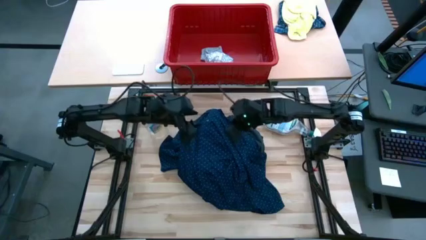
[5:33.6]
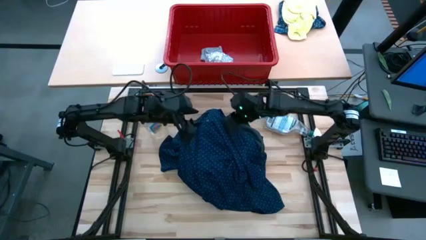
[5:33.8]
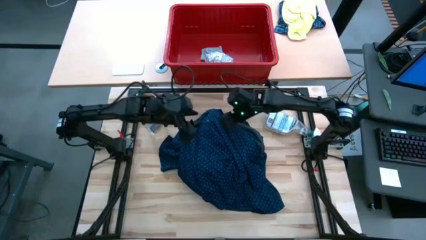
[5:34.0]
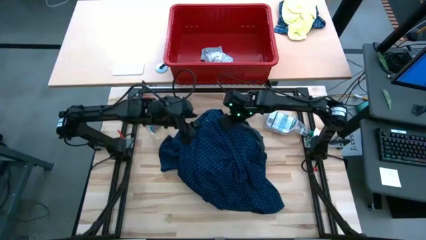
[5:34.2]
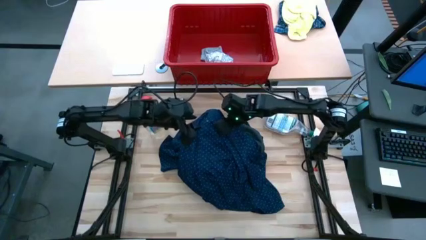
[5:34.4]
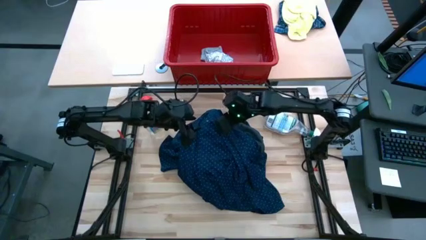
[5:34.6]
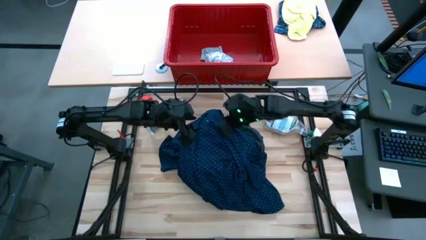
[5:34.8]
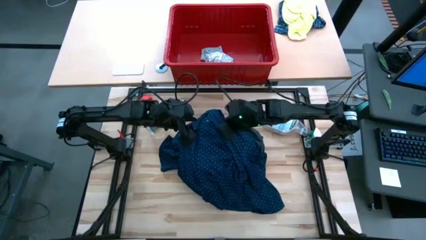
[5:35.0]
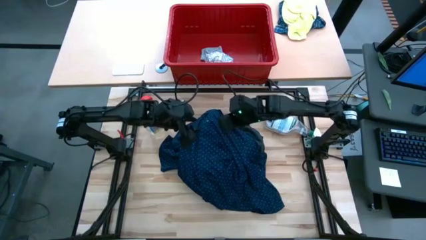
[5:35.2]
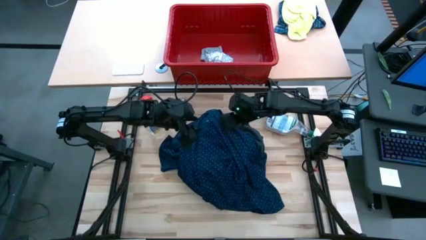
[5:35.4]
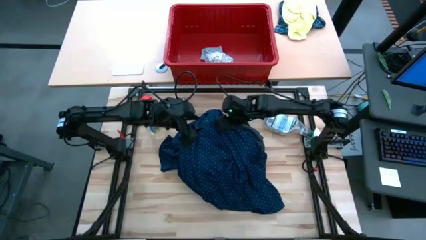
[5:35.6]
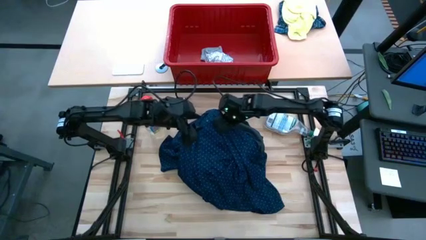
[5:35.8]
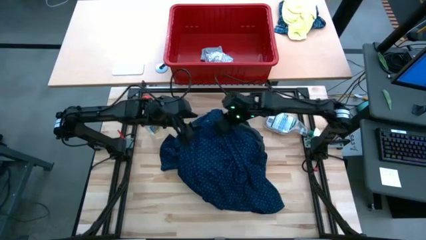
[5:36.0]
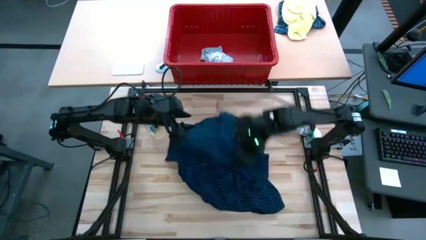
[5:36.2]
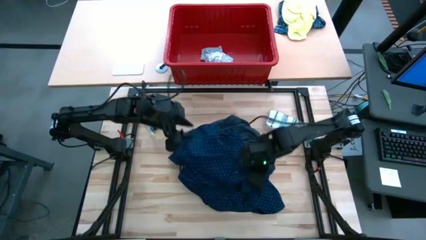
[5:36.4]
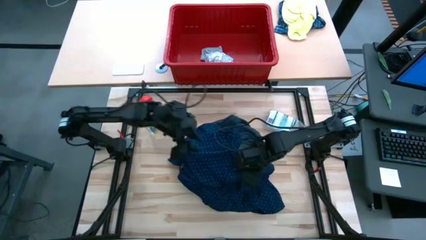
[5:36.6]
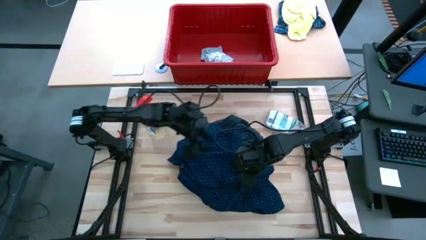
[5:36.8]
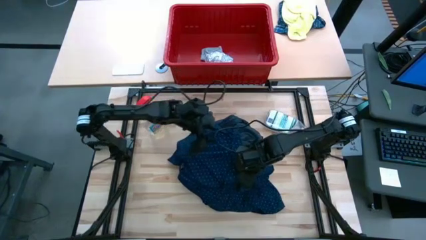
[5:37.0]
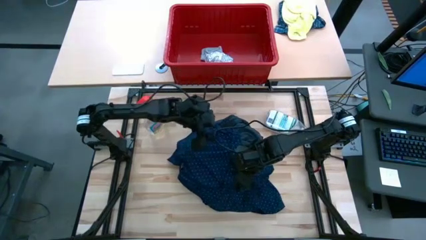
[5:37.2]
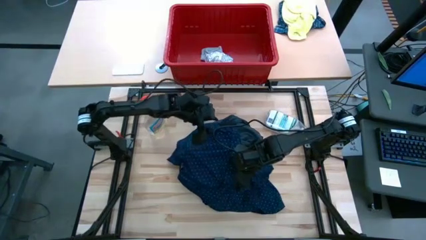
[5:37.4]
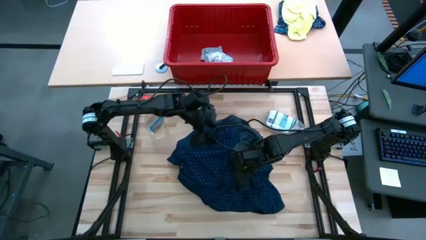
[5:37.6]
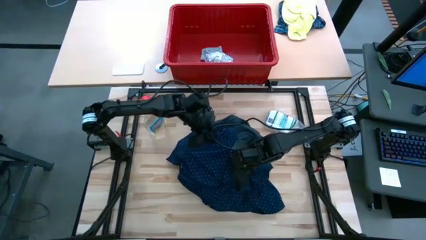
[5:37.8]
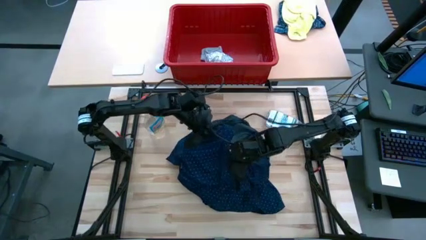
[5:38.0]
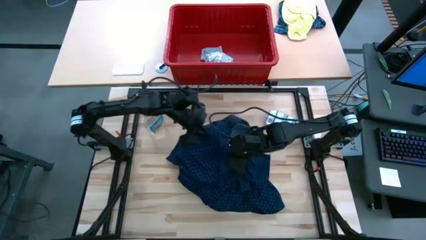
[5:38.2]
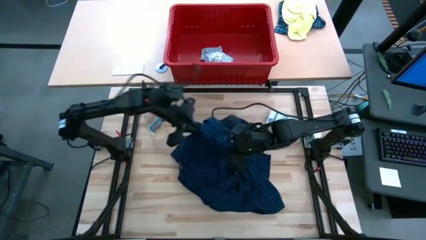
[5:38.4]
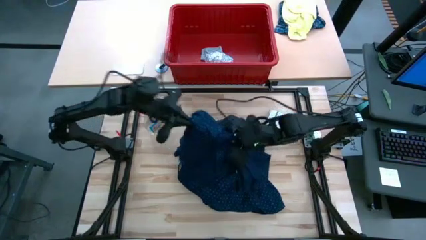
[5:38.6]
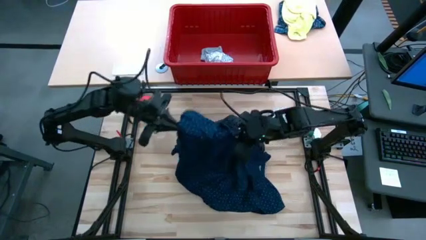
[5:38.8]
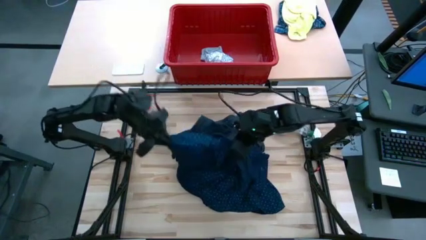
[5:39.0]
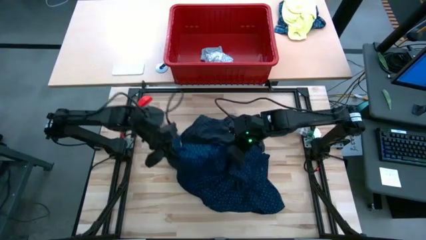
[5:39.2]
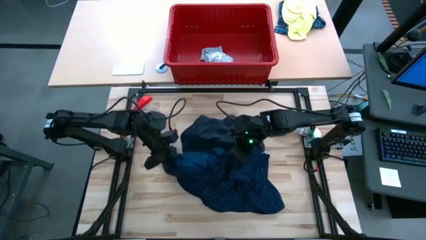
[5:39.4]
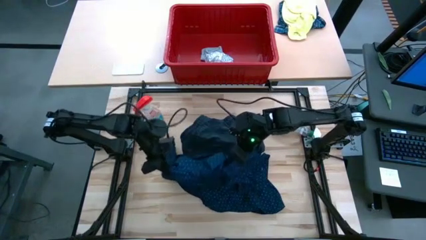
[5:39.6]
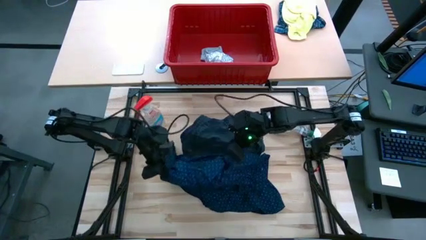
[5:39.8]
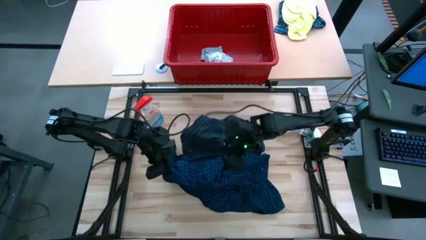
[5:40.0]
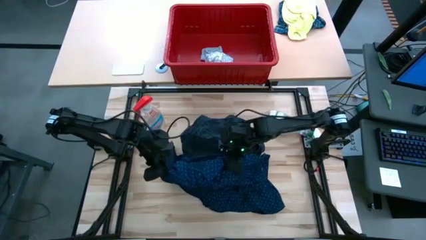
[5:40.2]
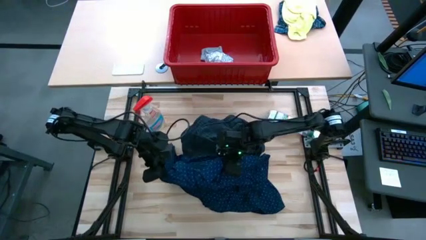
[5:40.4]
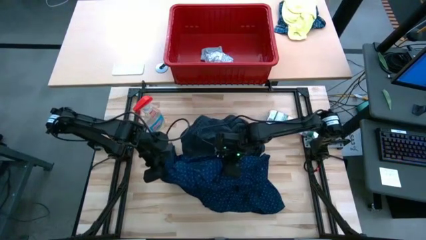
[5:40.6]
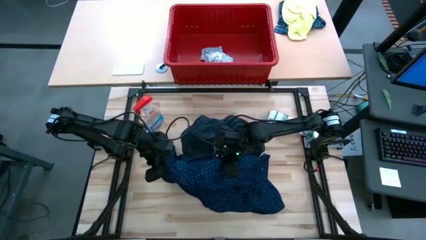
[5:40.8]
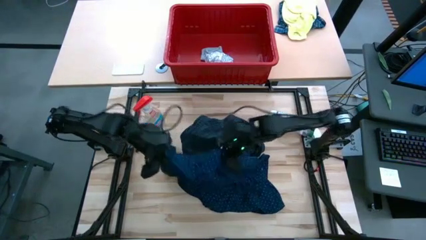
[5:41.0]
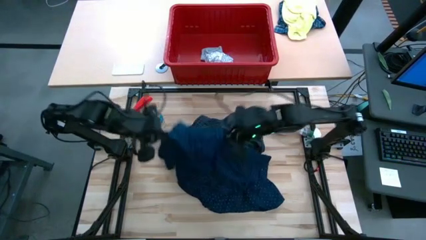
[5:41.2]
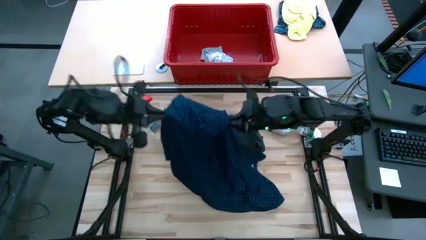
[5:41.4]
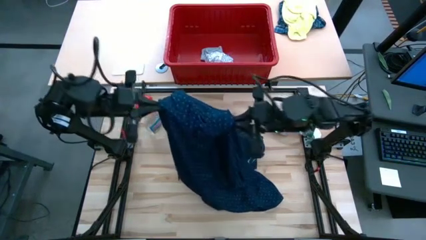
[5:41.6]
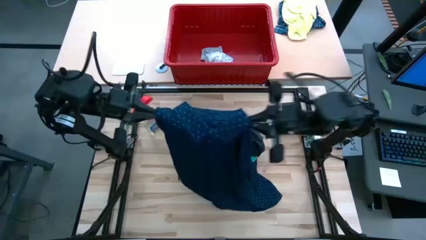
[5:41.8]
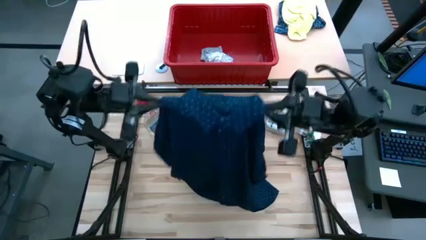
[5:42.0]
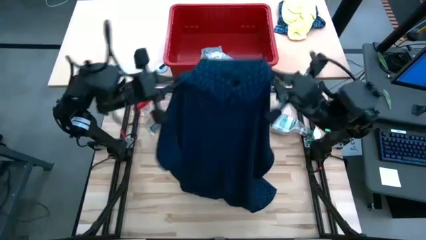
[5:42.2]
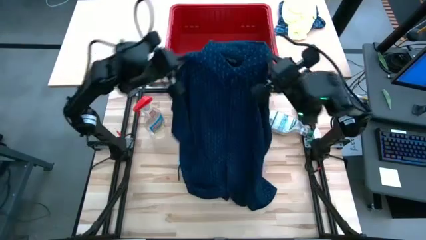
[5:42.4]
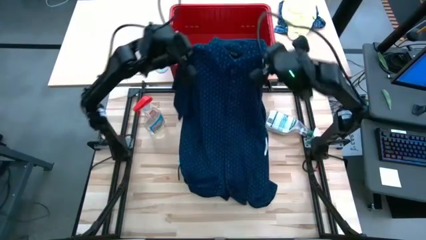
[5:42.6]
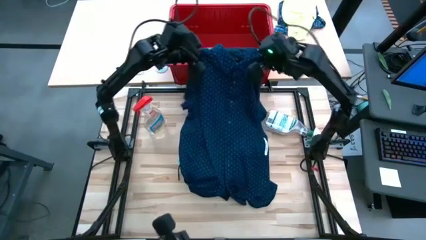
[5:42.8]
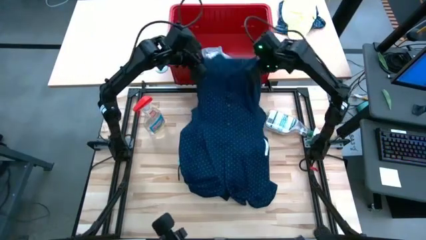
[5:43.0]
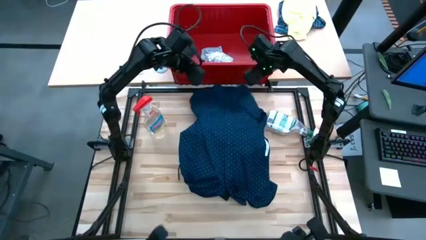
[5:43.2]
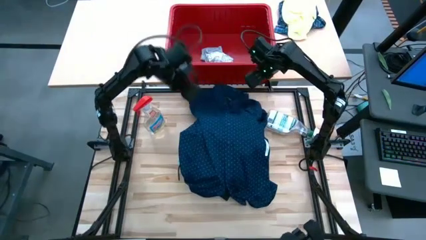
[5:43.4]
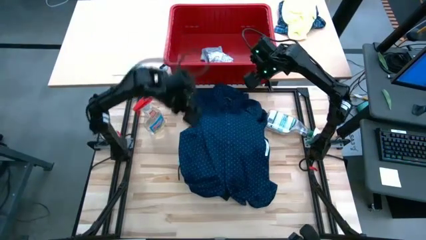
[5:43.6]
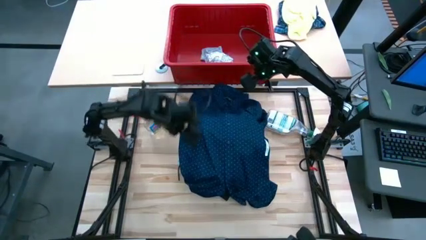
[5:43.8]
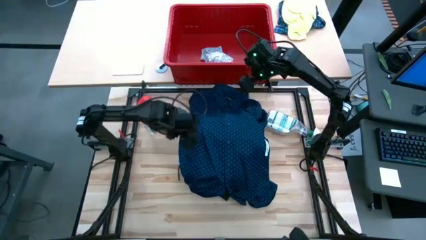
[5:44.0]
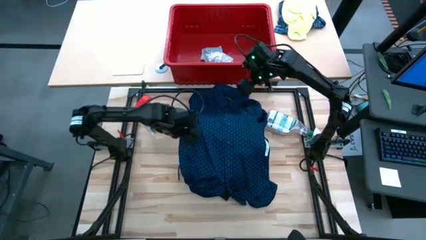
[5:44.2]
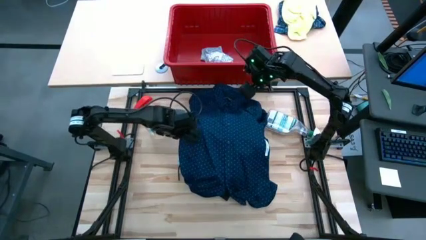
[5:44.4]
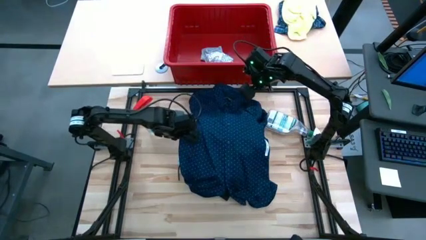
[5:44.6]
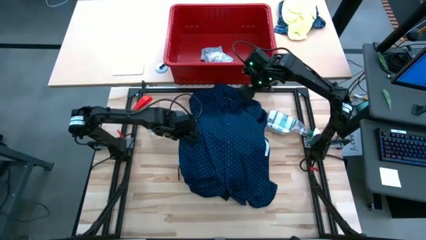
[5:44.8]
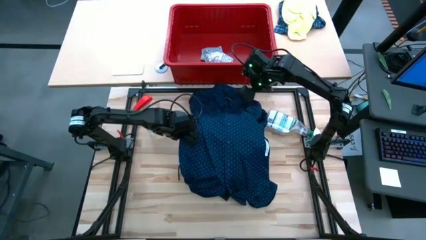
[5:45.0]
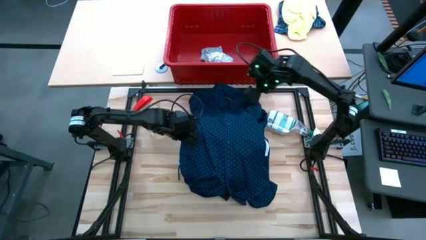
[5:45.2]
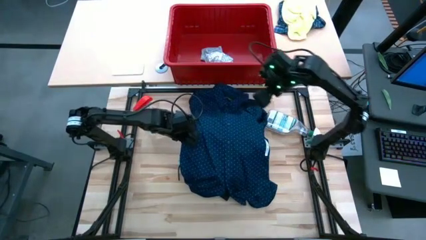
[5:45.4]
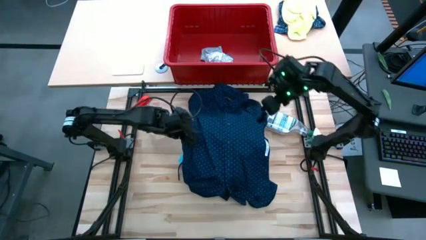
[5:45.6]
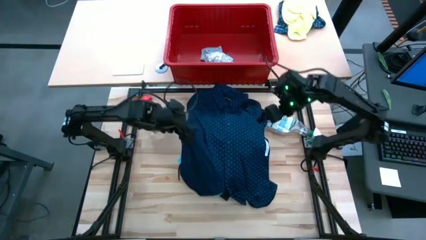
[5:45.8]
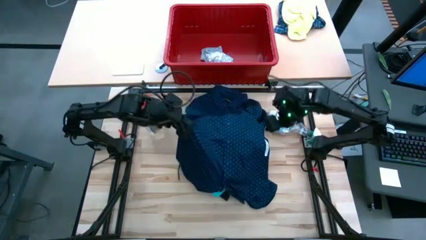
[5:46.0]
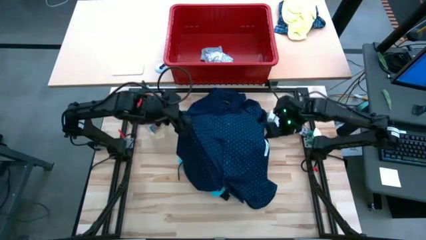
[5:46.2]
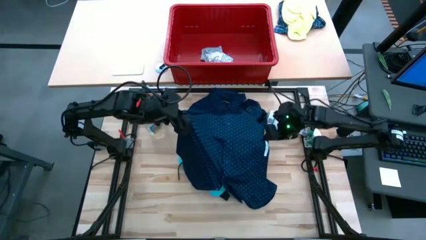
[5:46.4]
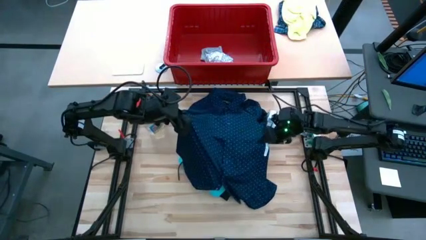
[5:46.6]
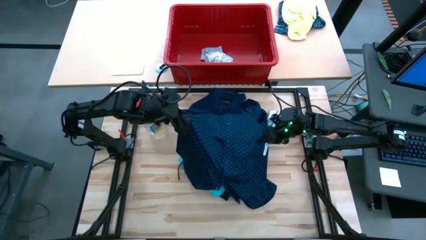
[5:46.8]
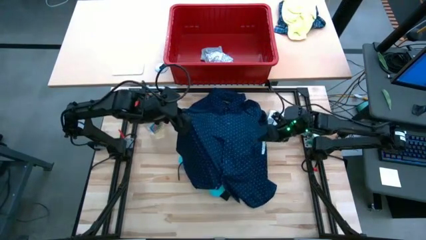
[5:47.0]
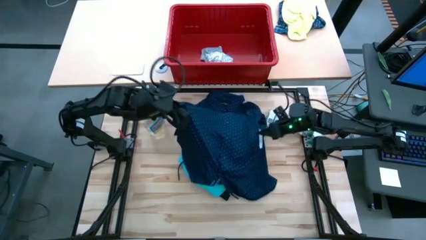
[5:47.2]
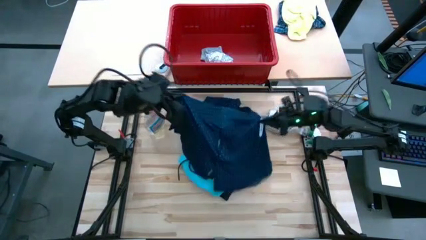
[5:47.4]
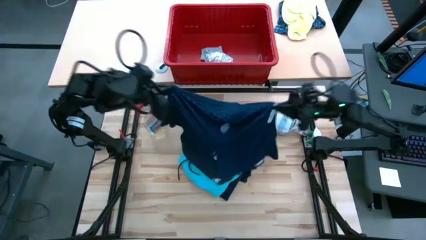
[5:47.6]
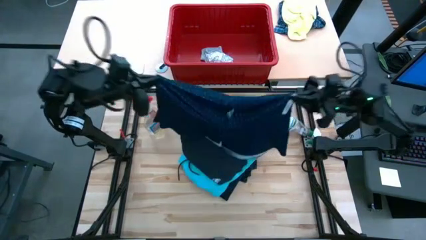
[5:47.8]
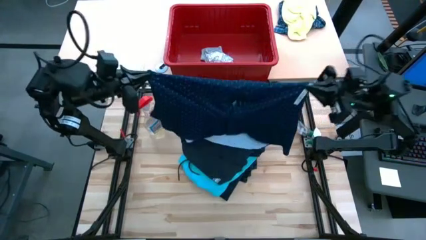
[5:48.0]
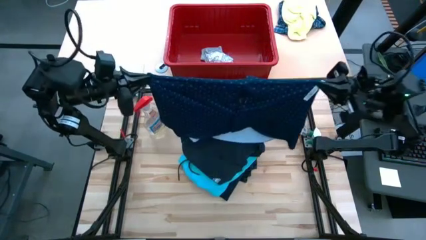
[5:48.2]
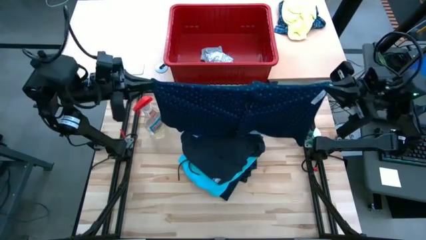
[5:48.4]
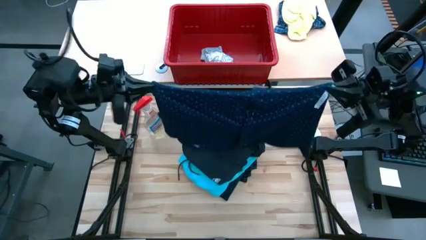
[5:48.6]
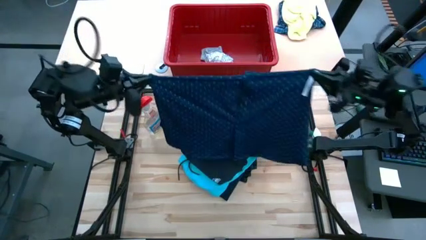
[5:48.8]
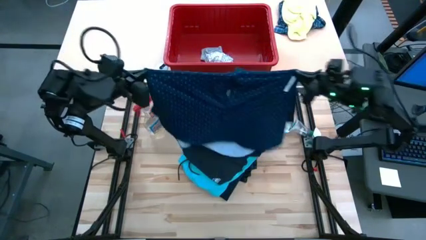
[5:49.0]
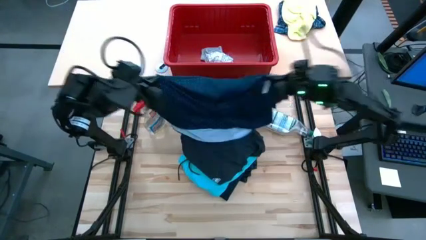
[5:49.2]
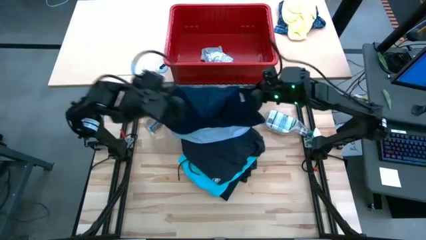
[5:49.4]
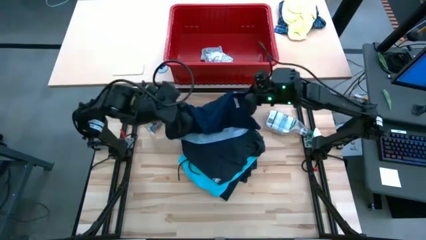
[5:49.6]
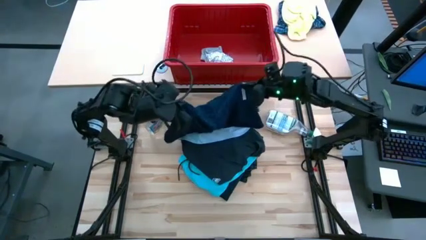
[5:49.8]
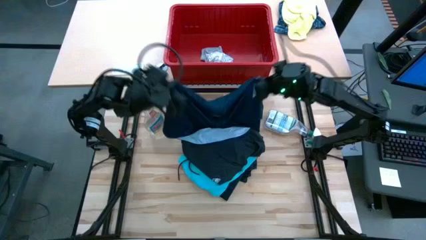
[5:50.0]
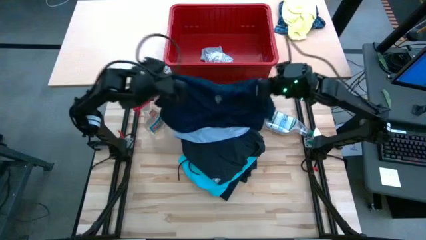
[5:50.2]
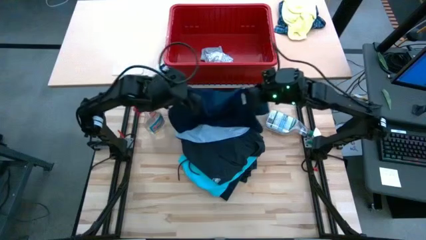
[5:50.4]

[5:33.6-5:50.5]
Task: Fold Laundry from Bin
Fold the blue polo shirt
